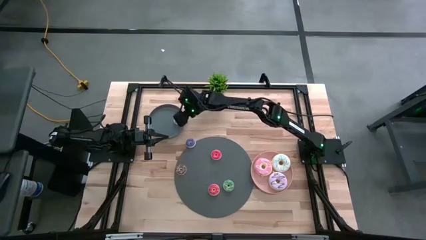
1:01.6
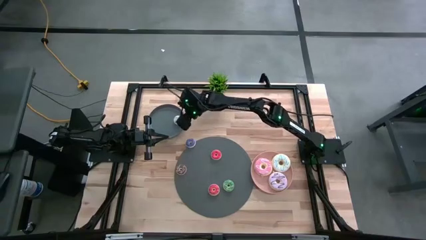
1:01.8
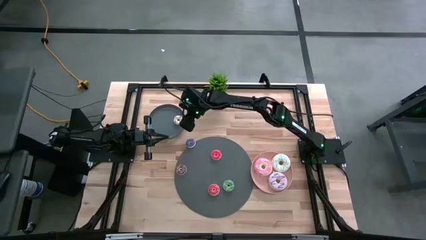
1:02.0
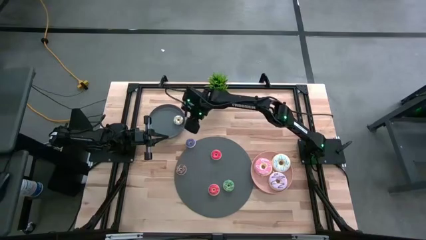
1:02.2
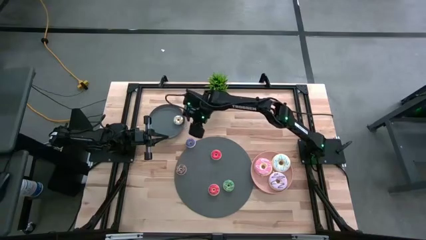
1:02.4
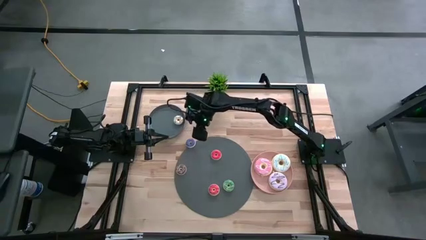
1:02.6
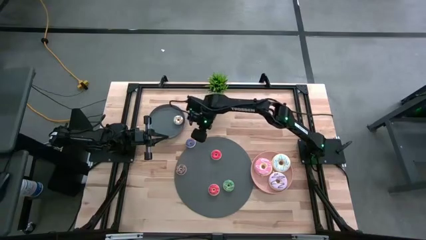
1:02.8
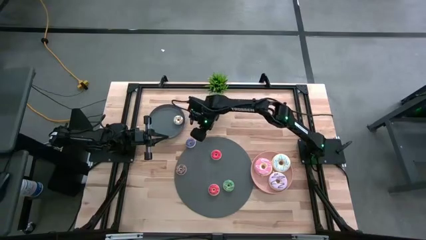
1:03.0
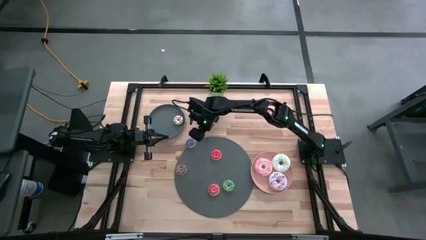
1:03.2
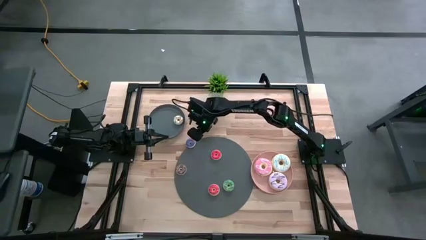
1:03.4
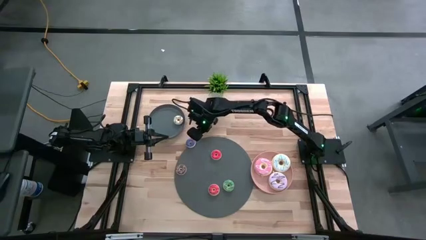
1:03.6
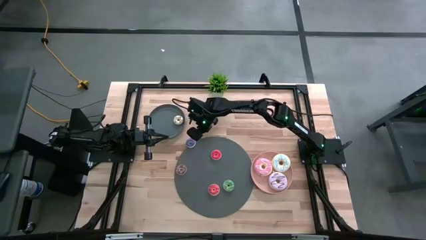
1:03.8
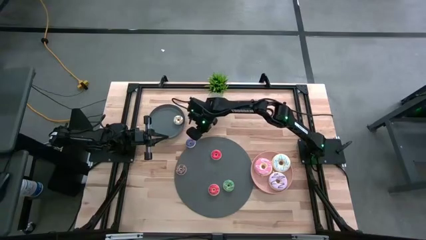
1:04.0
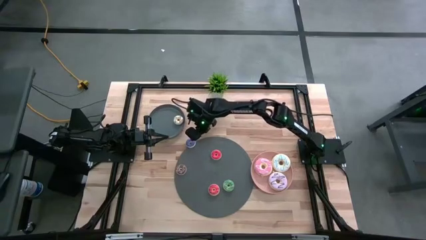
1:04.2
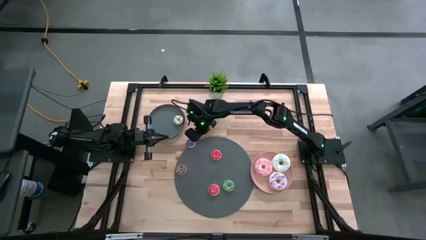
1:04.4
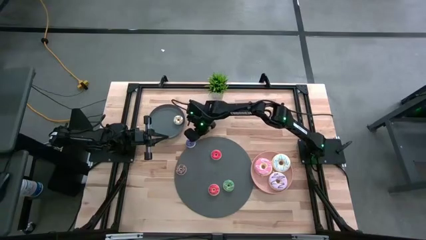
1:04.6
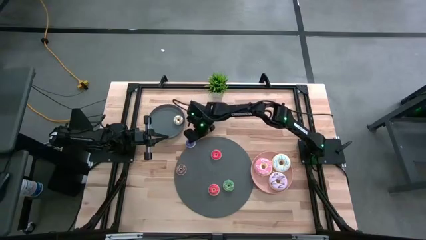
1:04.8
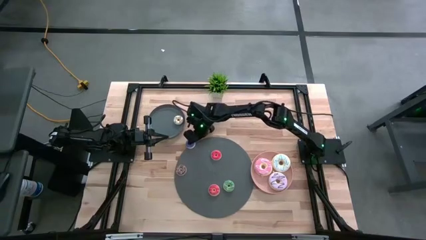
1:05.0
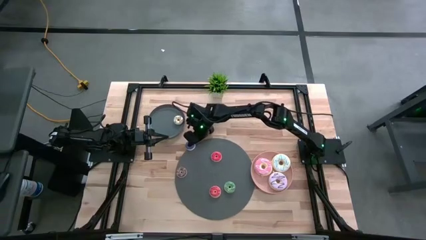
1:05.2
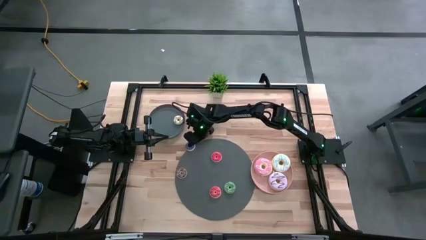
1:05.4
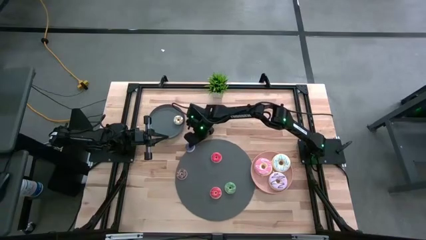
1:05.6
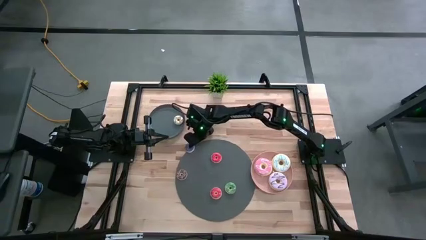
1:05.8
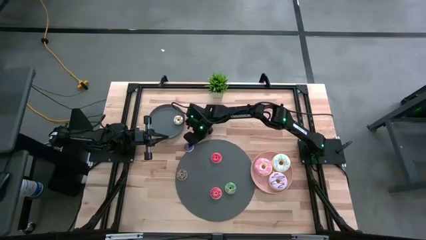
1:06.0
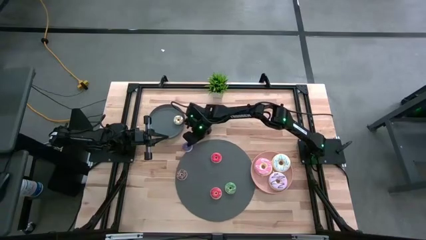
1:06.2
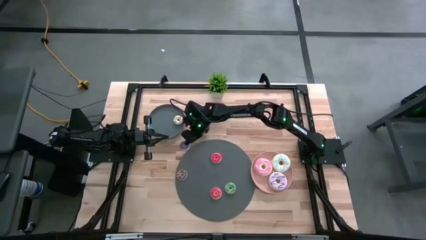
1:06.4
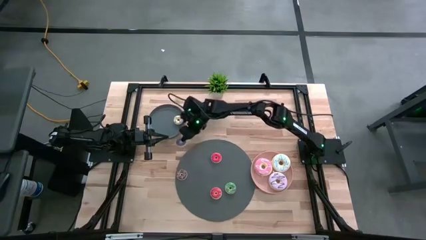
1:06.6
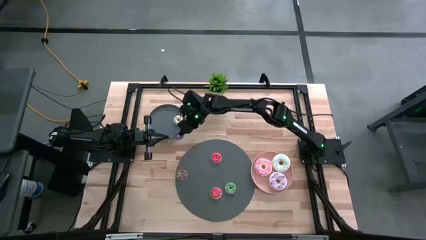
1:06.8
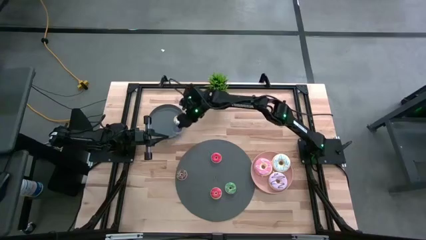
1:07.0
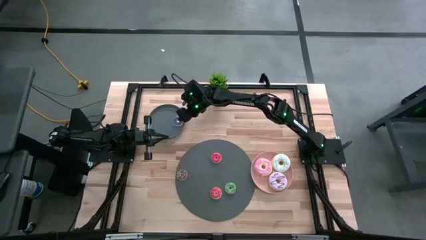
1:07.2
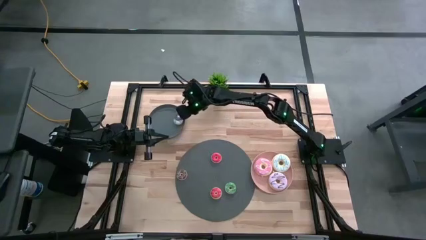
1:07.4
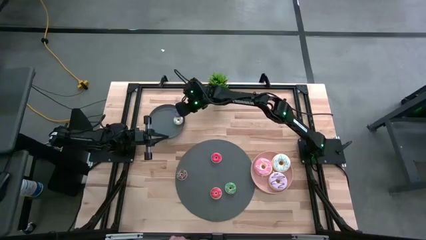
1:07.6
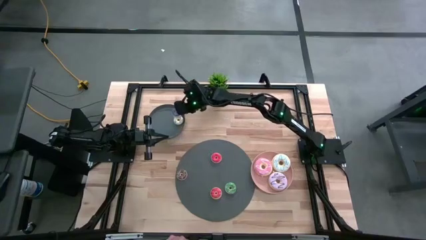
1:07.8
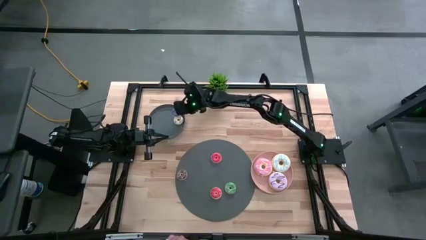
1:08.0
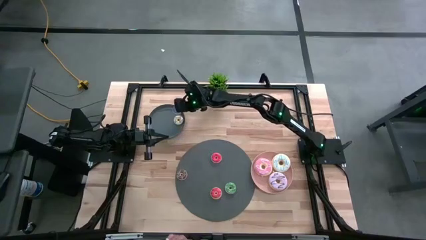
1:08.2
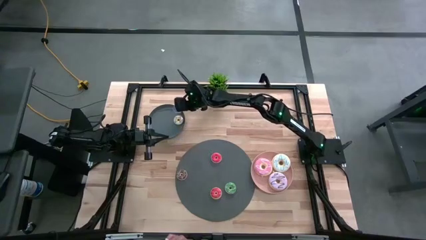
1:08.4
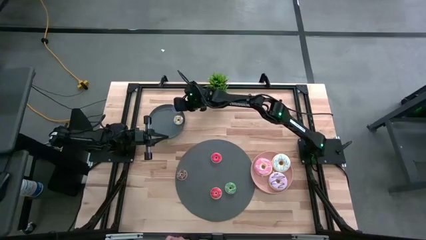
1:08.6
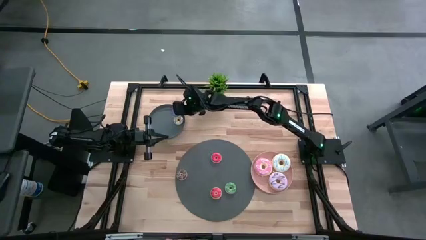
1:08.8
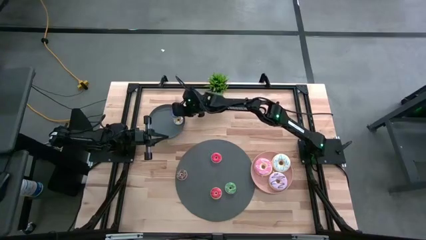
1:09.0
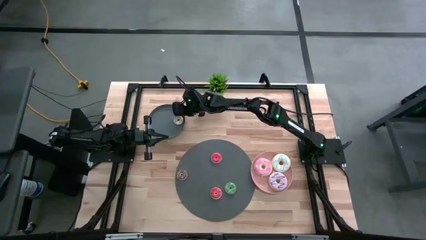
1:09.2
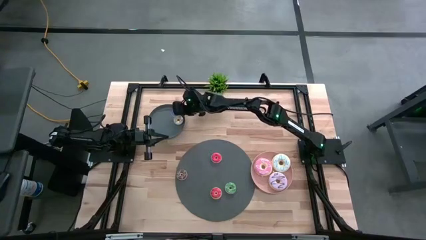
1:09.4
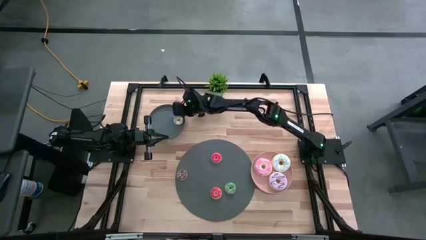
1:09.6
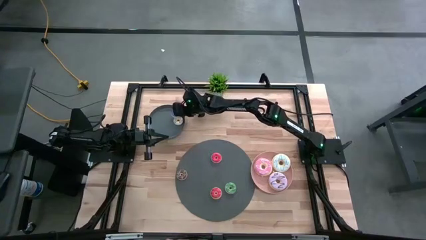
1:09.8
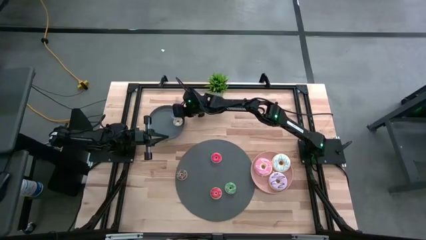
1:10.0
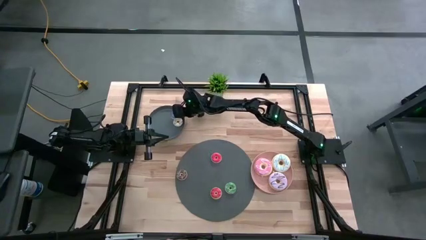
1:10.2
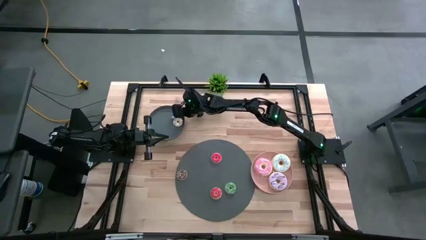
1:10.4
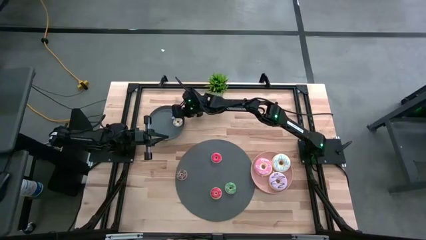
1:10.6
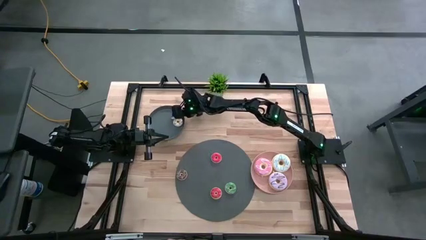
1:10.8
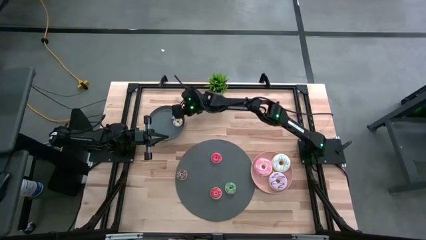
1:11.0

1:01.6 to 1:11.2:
Task: Pick & Place donuts
Put the small blue donut on the gray plate

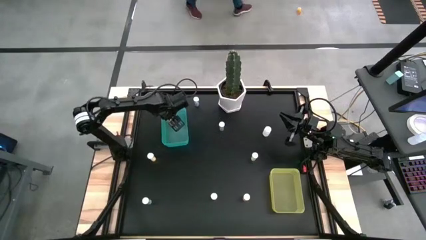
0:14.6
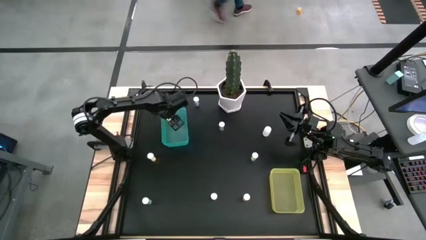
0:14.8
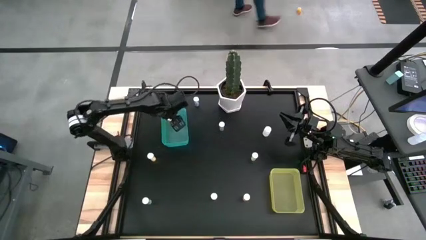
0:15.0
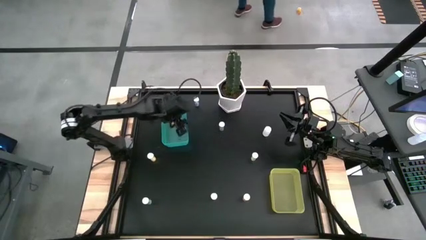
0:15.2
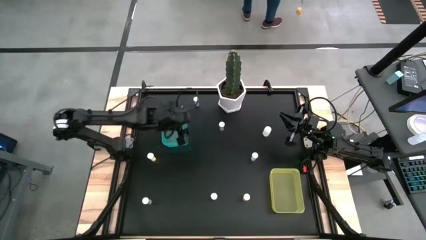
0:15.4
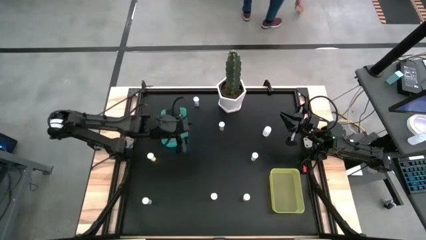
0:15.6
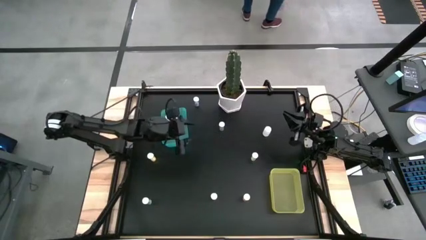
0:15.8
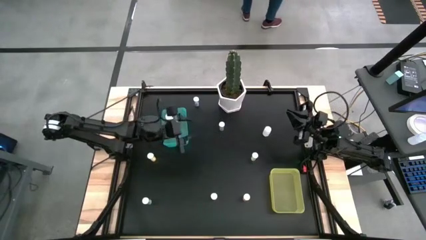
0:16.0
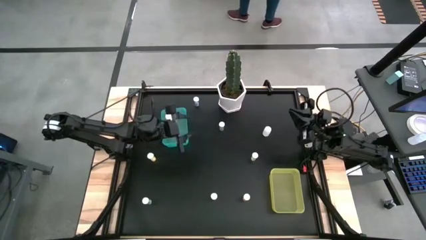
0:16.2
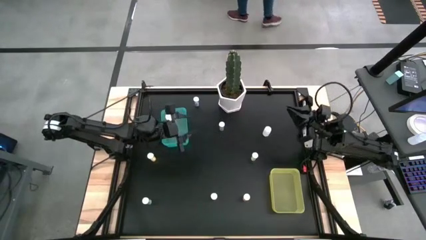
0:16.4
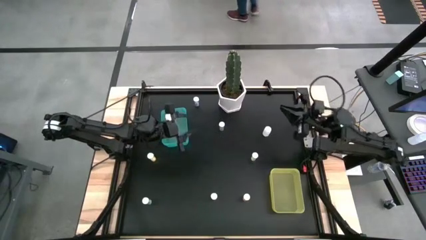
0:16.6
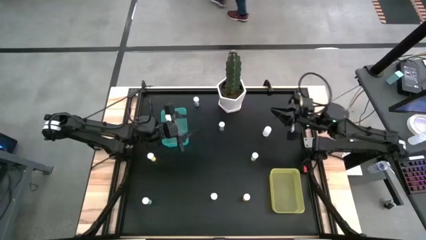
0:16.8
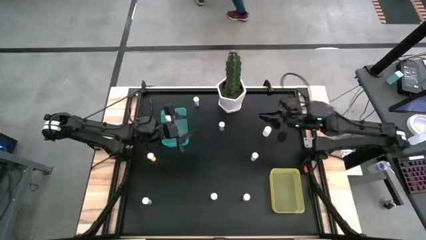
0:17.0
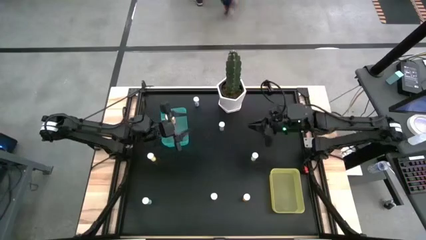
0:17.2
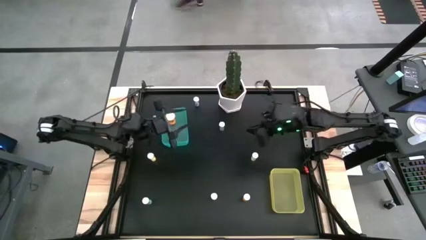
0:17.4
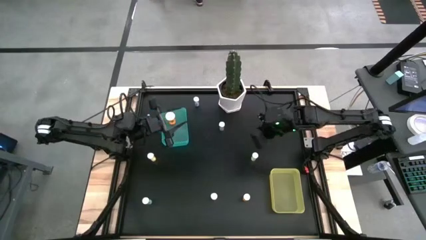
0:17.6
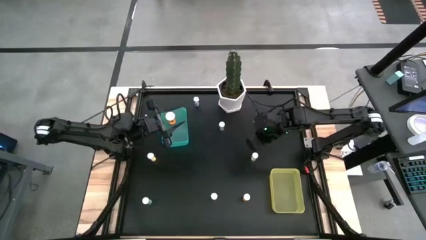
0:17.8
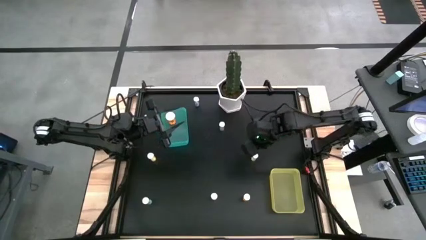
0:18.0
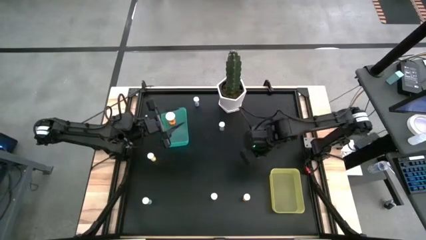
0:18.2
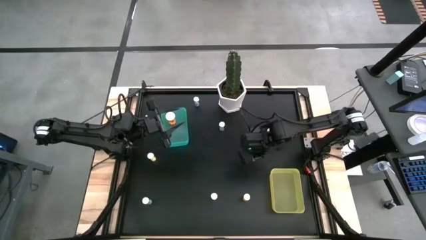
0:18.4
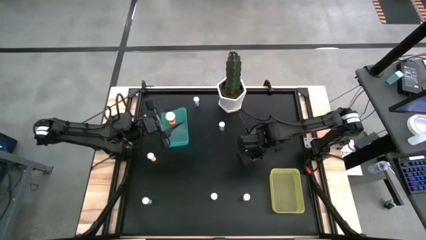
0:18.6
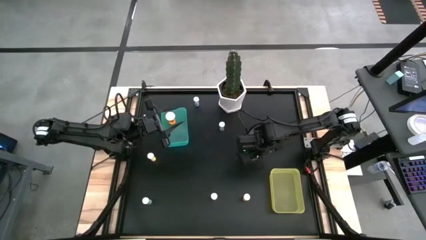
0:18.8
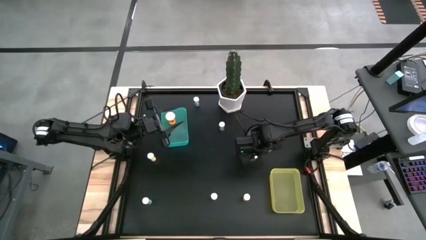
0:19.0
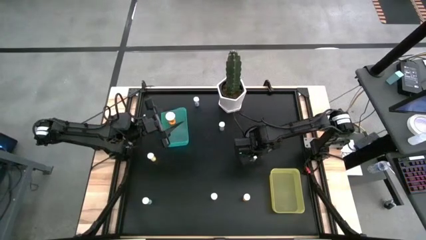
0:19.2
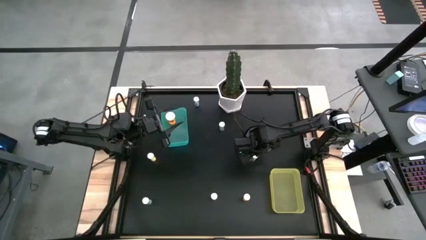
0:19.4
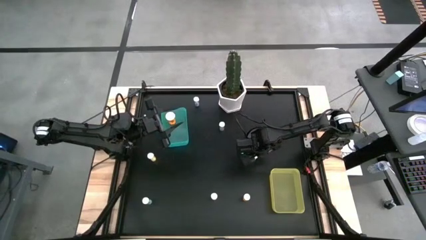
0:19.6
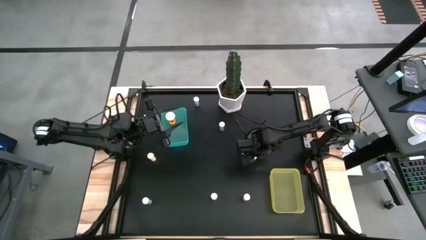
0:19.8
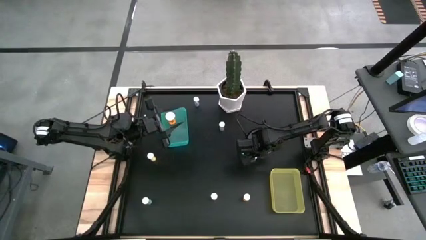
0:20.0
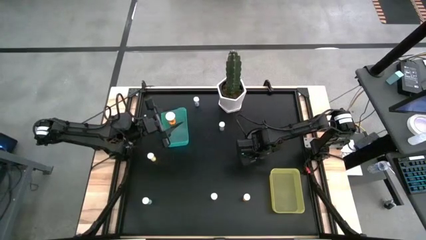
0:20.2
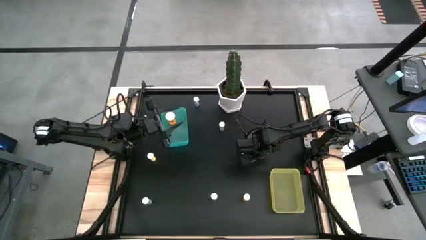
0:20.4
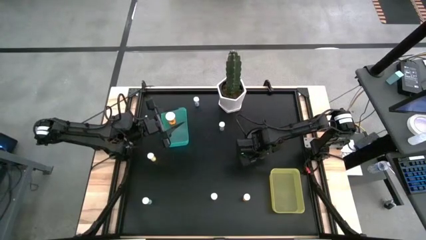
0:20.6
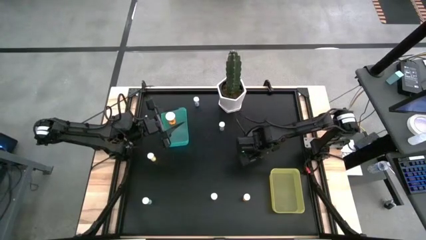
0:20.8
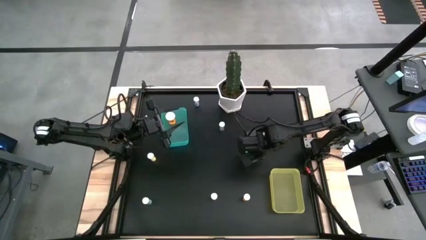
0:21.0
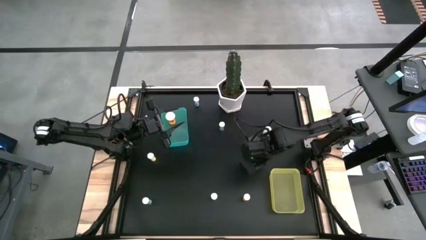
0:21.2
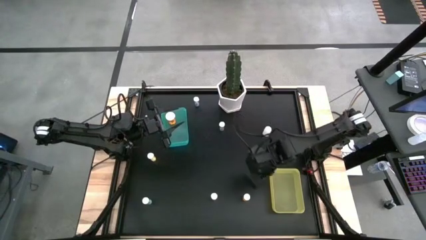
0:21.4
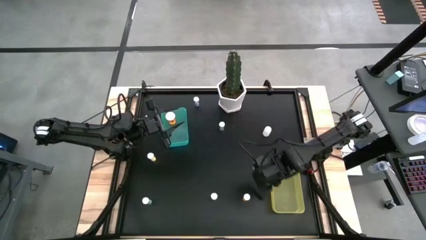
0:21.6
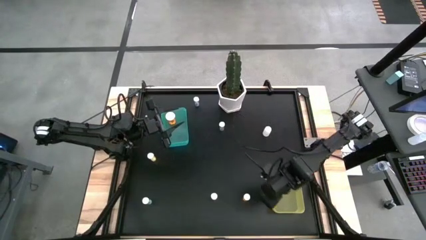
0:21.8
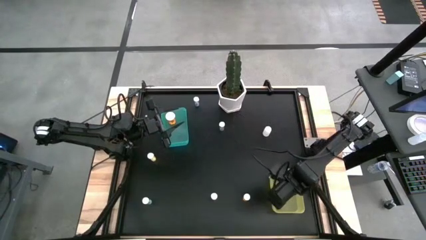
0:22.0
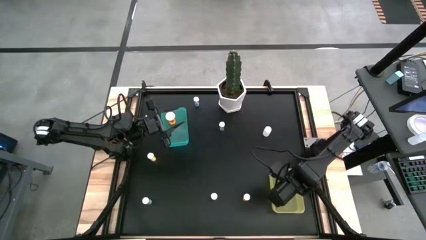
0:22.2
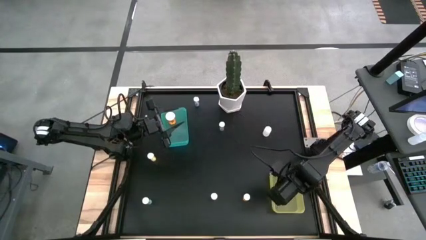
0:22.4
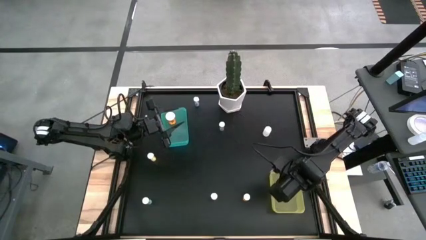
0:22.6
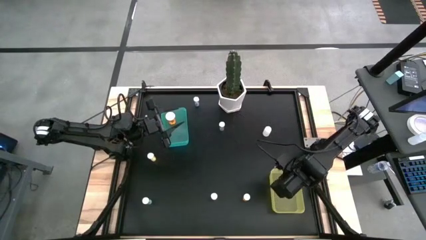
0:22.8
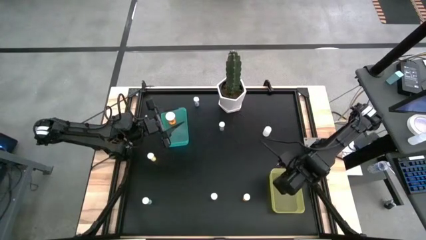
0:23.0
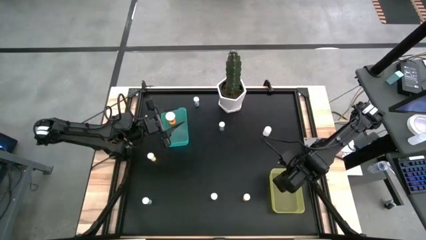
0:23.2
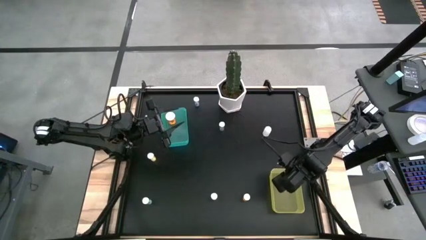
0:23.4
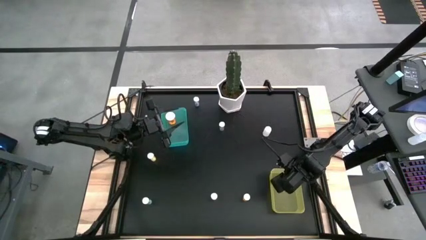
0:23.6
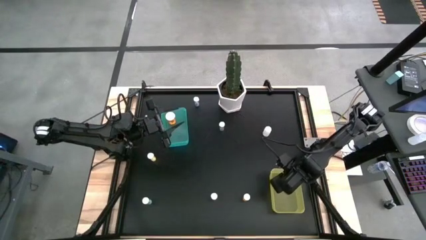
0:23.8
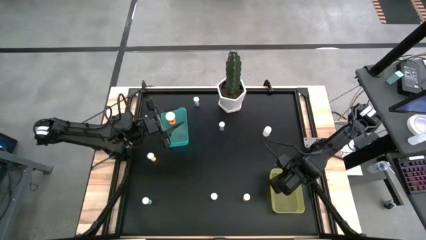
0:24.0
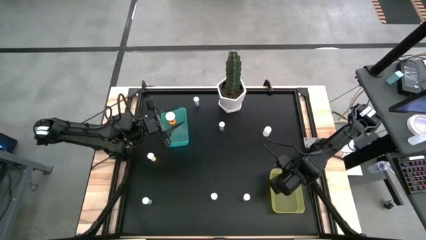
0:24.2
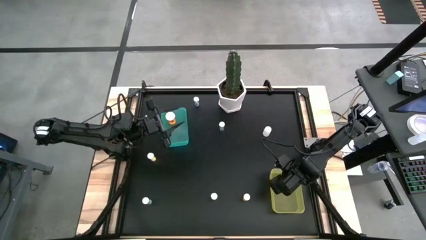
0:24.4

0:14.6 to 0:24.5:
Task: Pick and place medicine bottles into bin by pill shape (circle, oval)
Put the right yellow tablet bottle into the yellow bin
